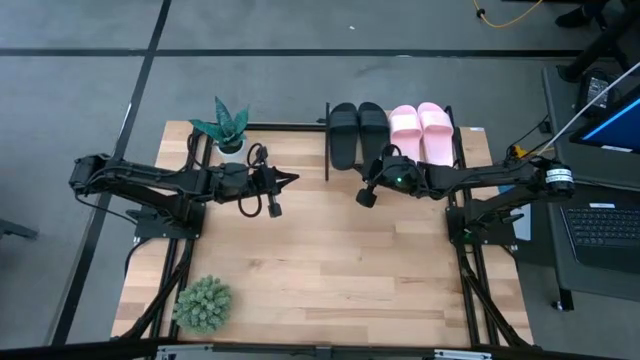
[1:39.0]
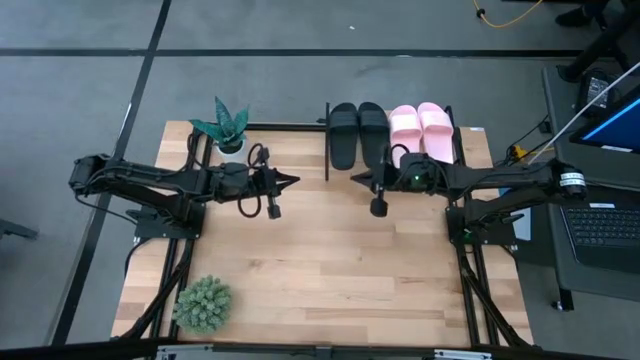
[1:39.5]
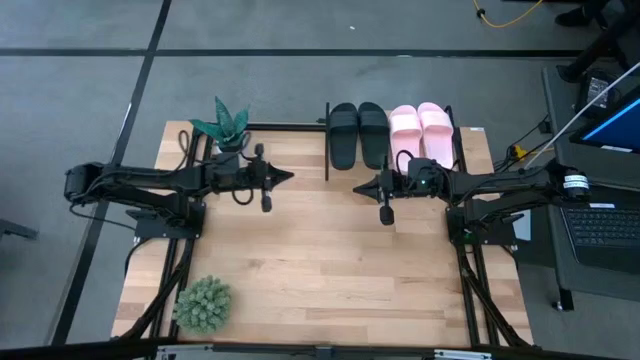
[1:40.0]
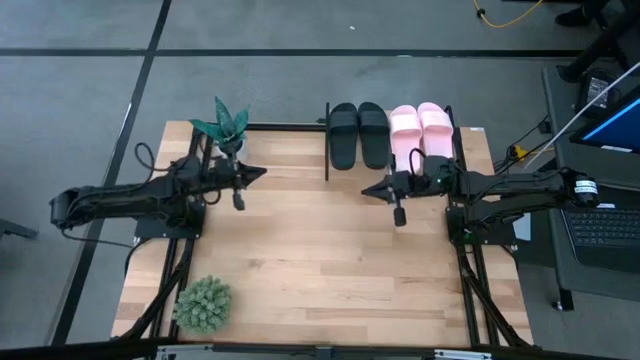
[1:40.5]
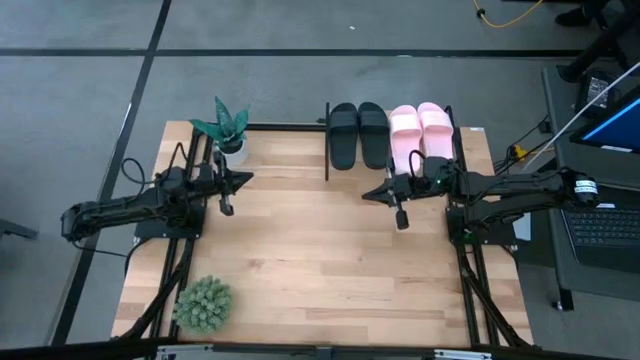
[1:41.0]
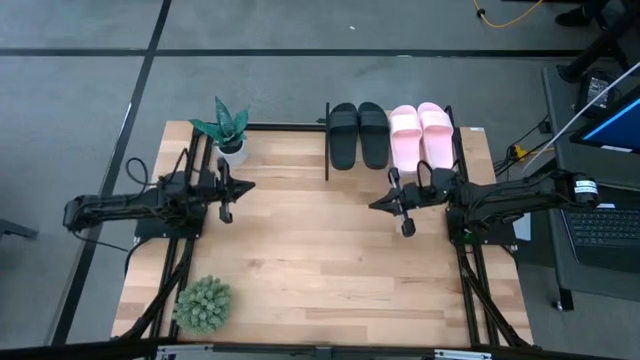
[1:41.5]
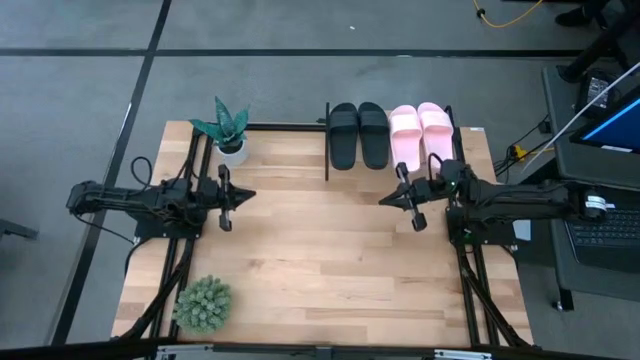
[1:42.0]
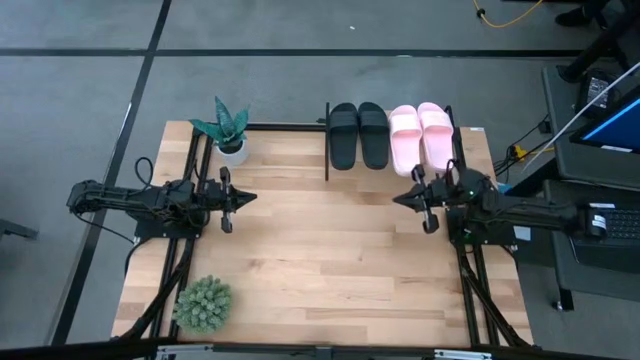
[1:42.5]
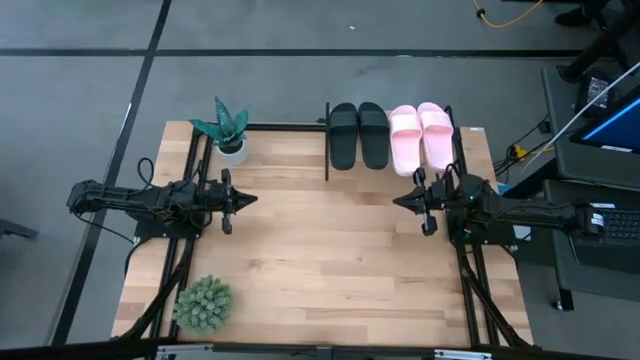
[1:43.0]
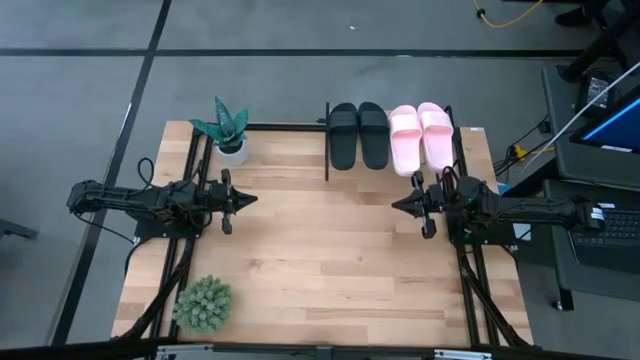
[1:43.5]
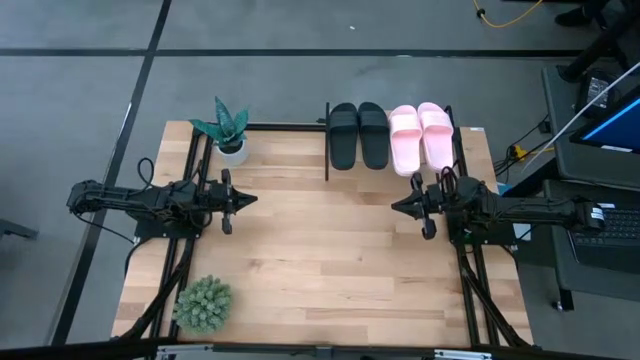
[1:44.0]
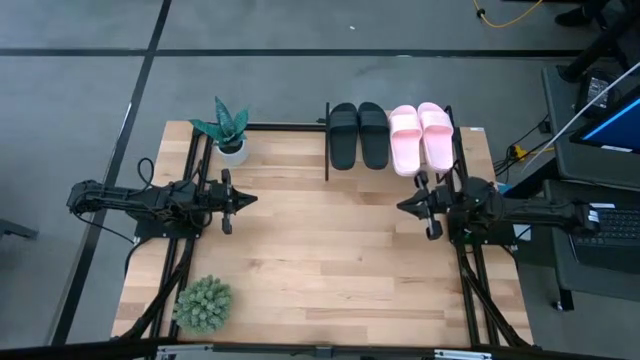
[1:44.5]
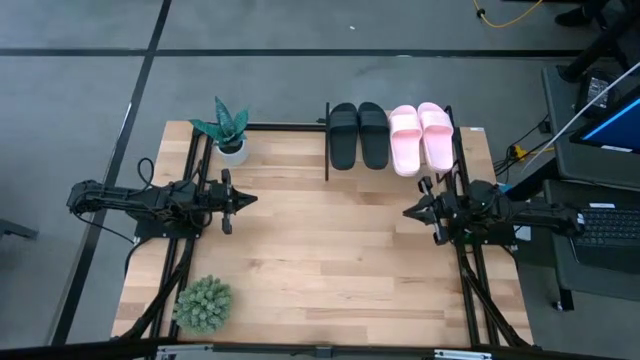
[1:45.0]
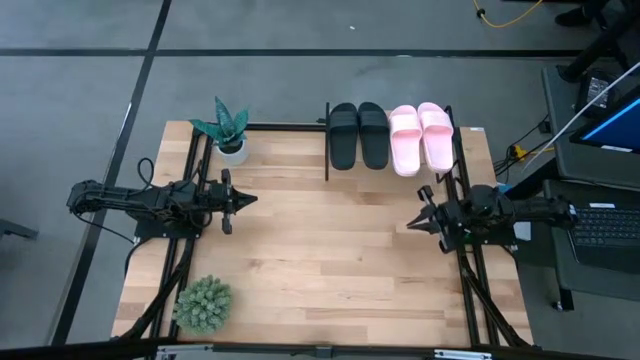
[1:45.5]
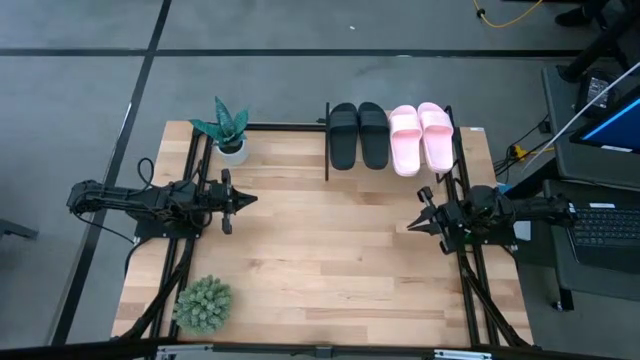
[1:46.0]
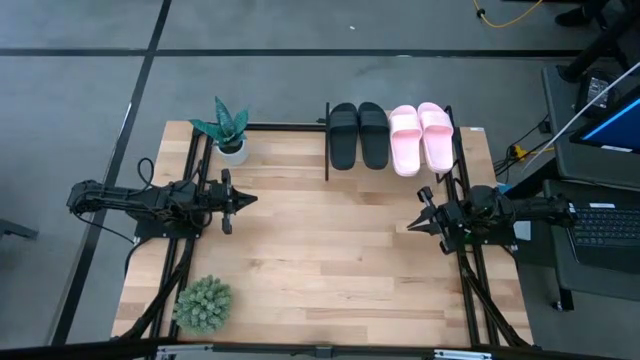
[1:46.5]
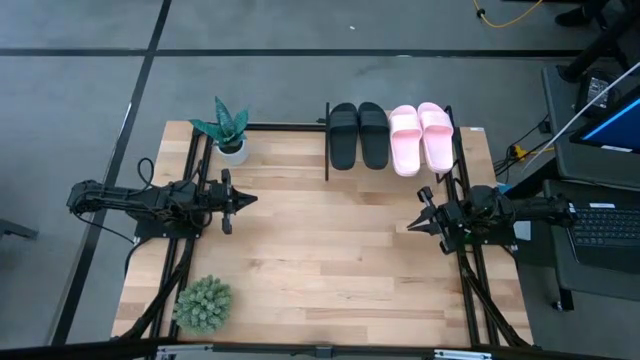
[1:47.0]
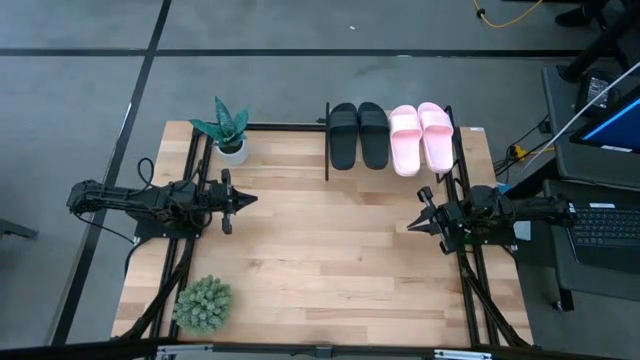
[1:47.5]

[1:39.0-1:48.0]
Task: Pick and place slides into the shelf
Return to Home Position

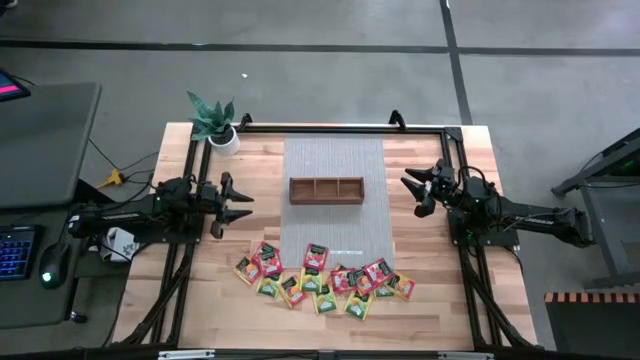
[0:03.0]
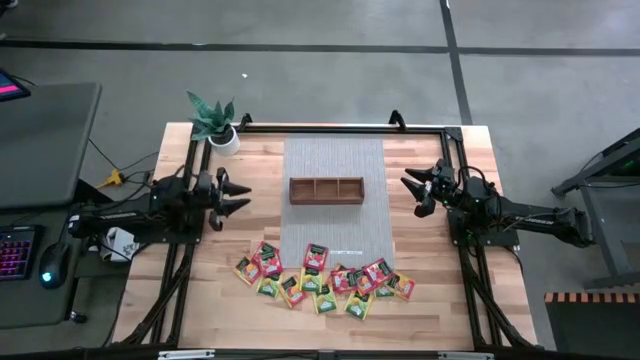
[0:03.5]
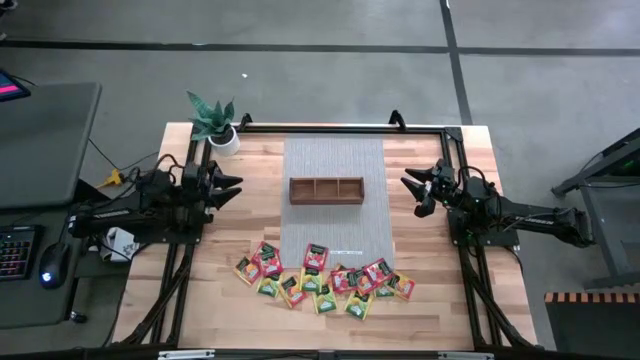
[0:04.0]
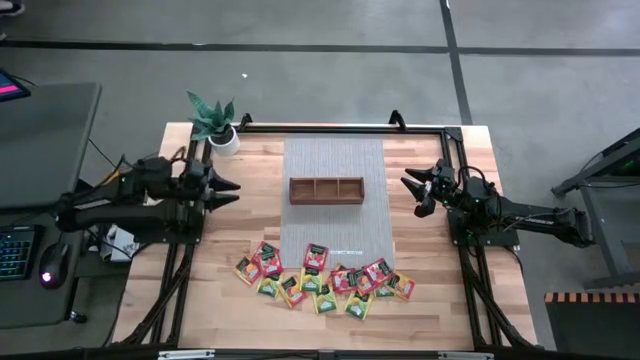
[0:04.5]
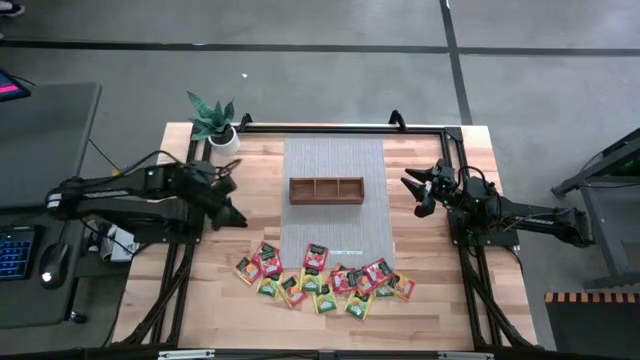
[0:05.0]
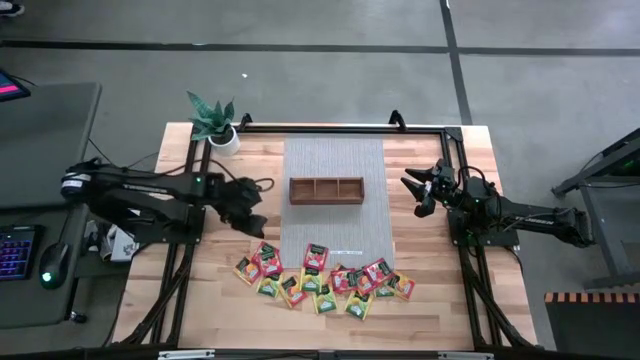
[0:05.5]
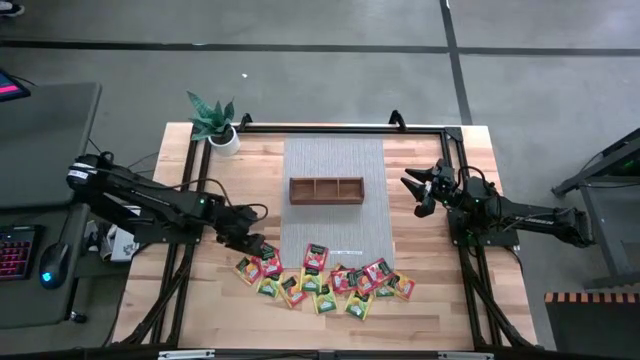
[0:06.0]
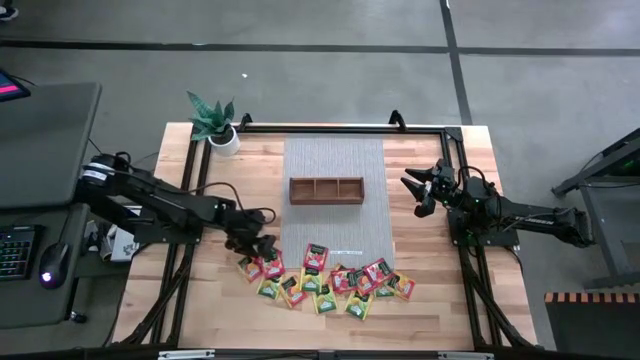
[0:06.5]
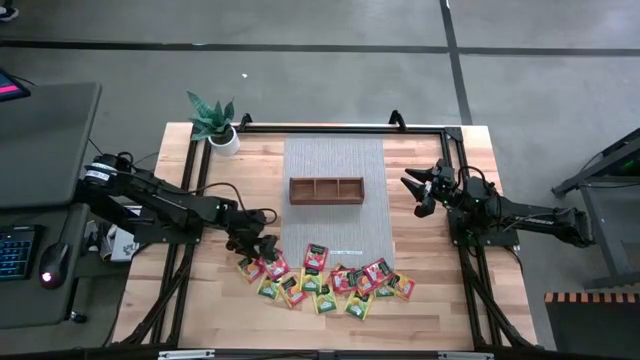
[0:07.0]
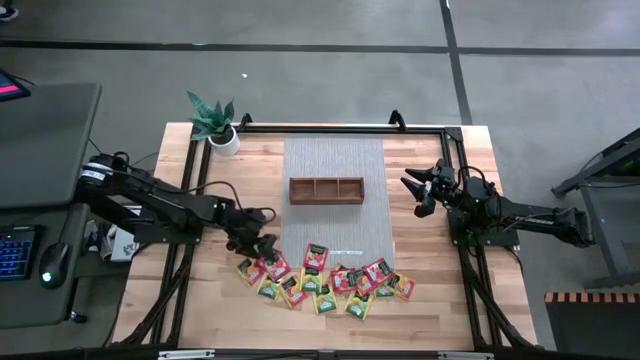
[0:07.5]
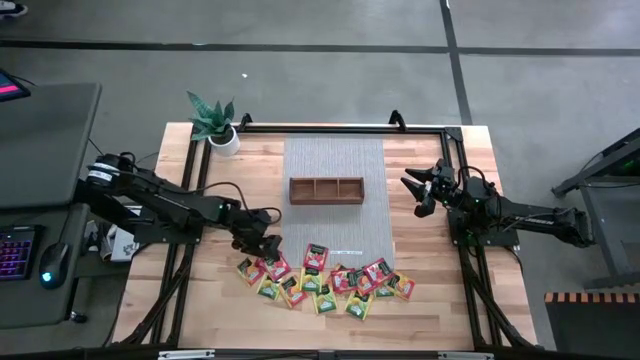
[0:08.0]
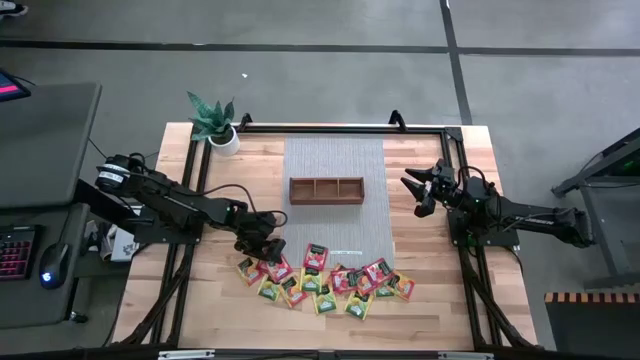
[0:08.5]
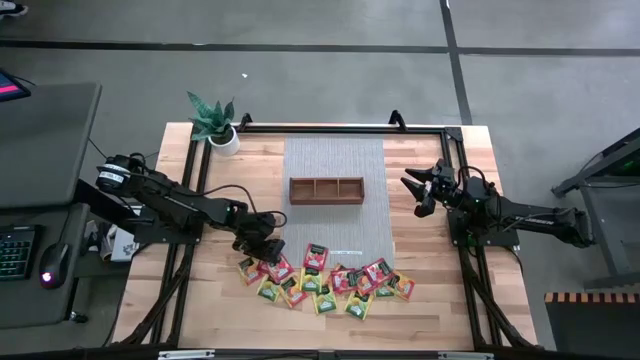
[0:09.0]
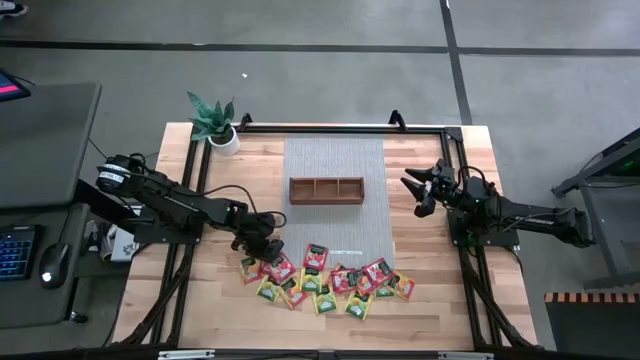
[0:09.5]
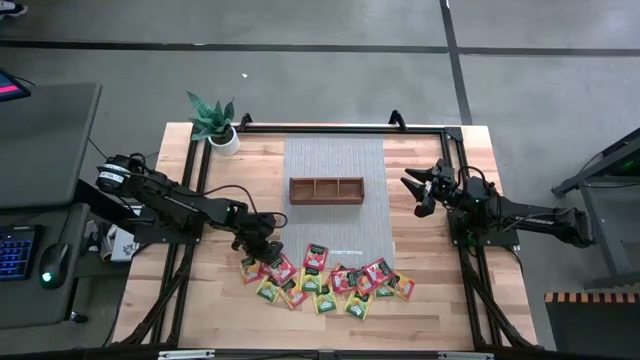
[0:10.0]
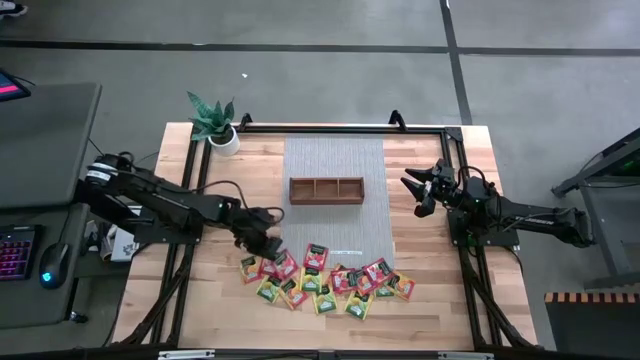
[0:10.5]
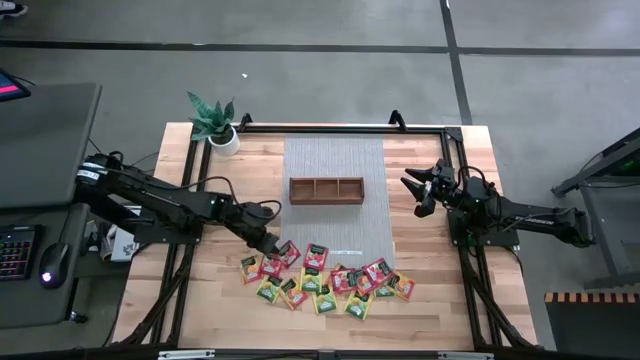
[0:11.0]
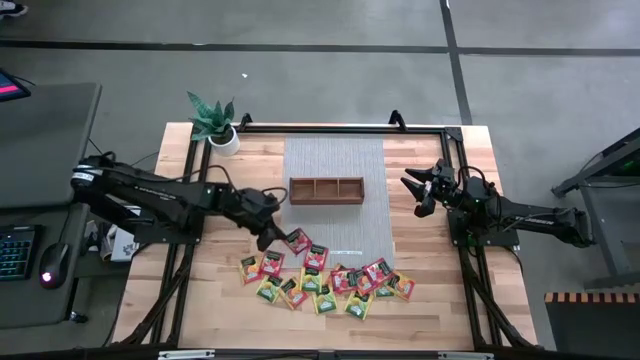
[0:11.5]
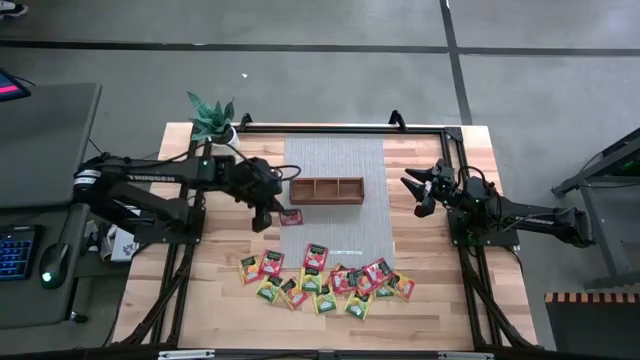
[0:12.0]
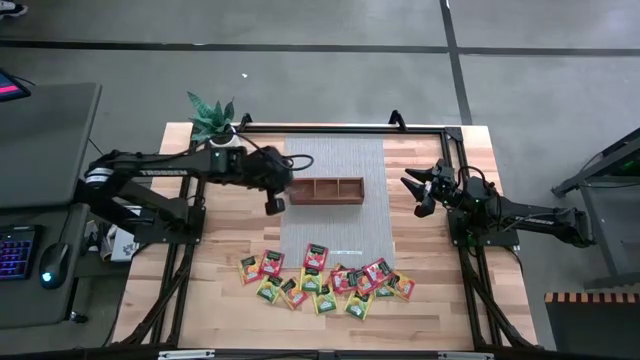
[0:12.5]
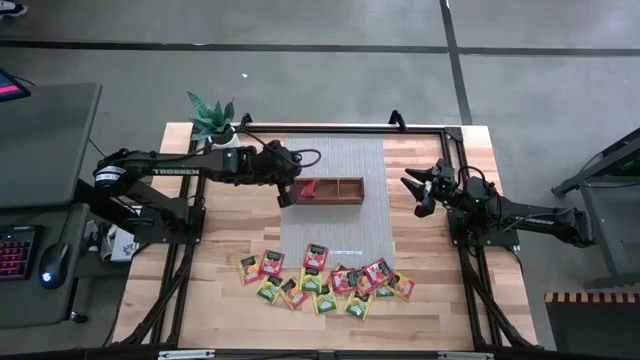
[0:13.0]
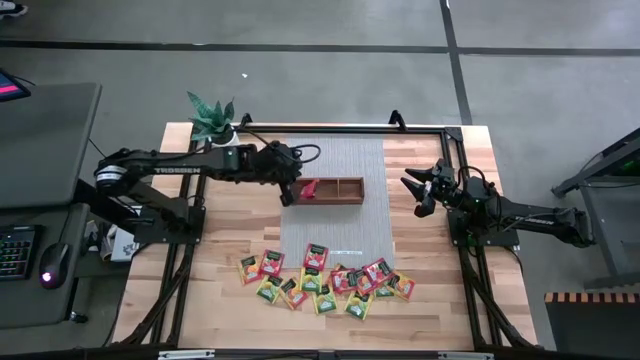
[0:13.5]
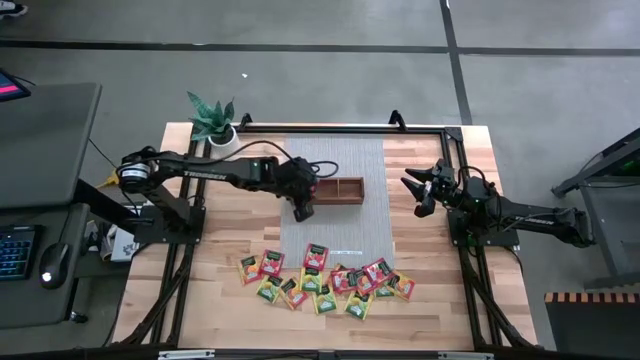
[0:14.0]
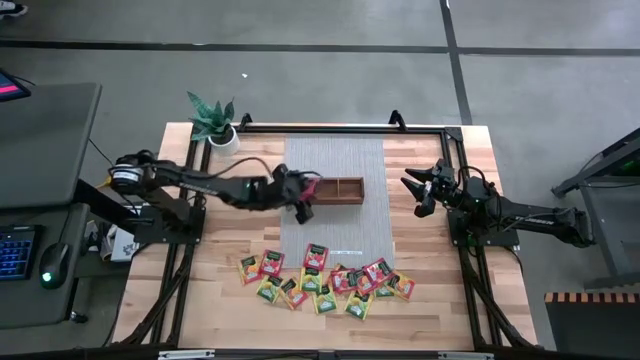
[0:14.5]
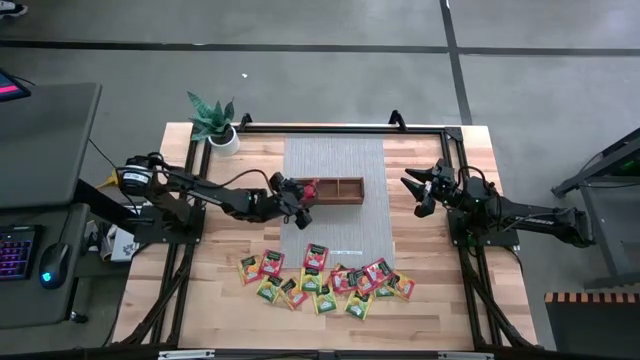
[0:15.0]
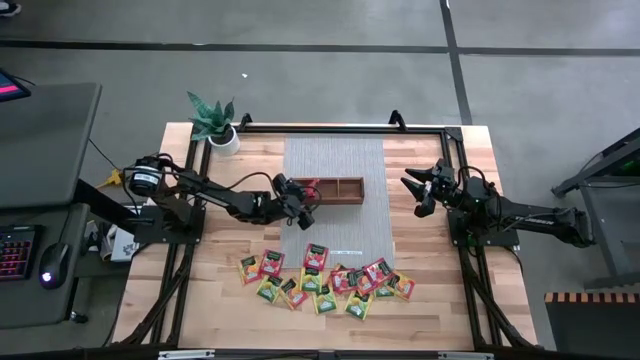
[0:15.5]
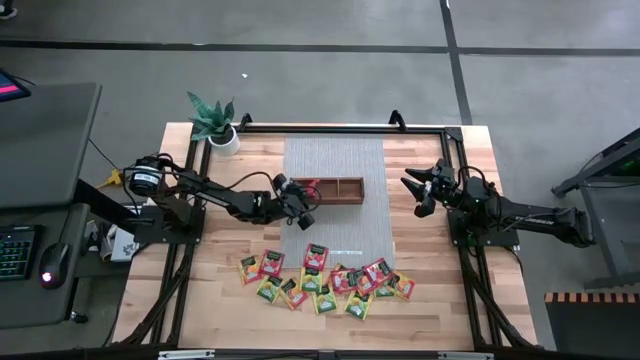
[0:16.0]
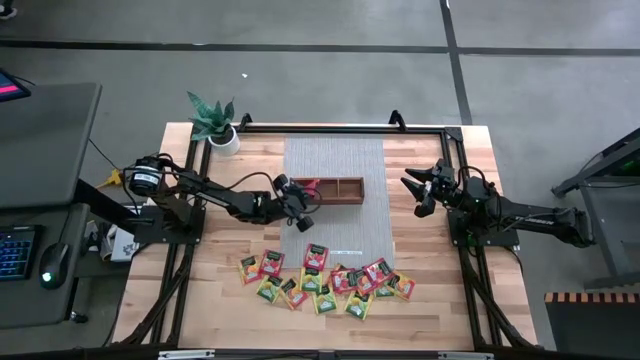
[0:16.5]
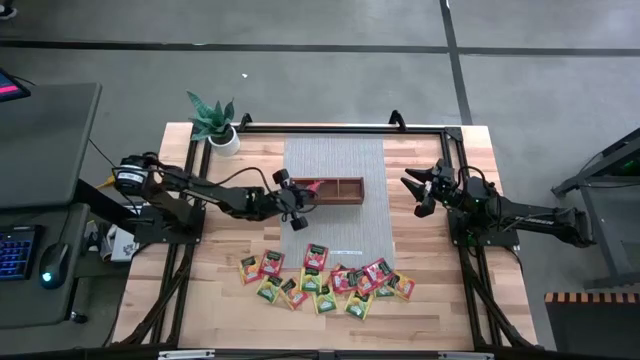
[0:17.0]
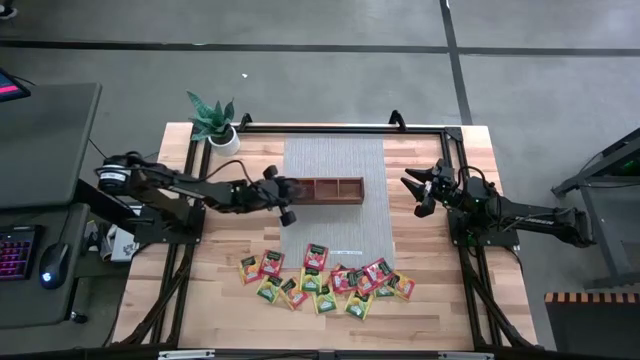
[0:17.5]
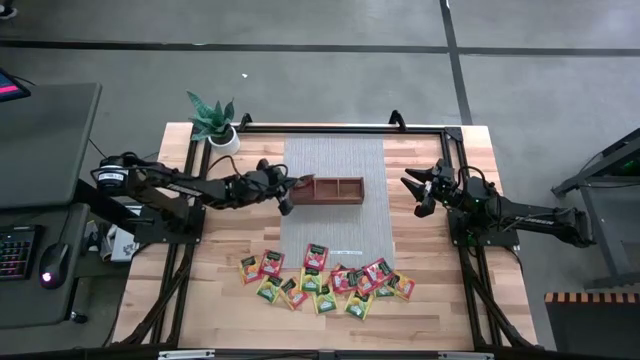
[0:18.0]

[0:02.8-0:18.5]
Task: Pick & Place Tea
Put the red tea bag into the left section of the wooden organizer
